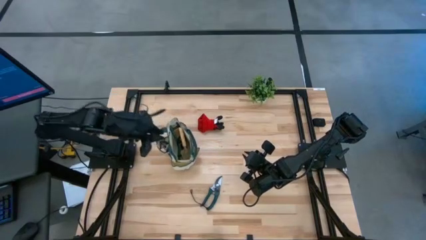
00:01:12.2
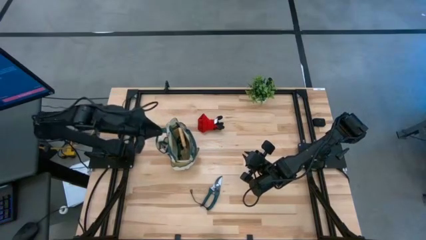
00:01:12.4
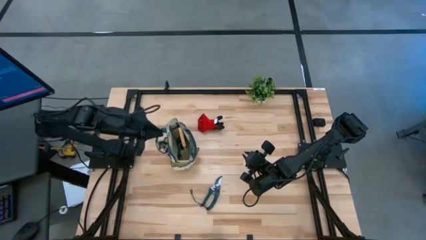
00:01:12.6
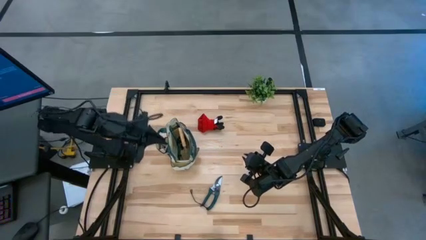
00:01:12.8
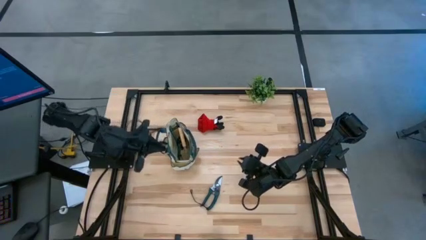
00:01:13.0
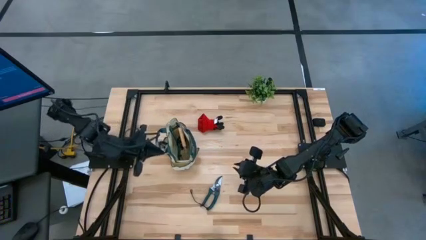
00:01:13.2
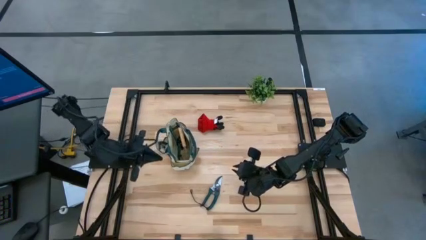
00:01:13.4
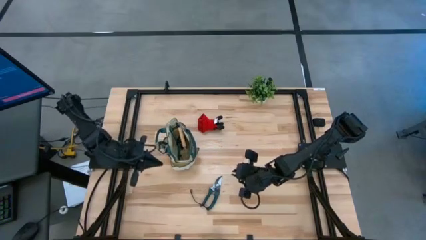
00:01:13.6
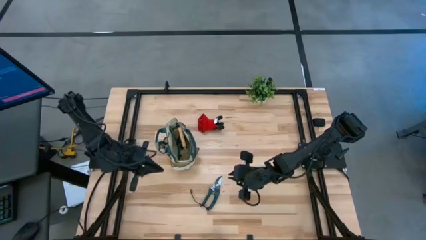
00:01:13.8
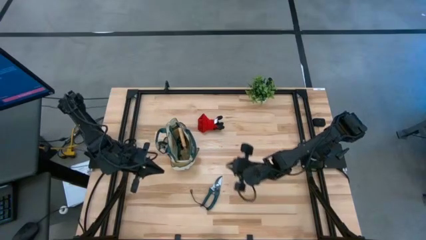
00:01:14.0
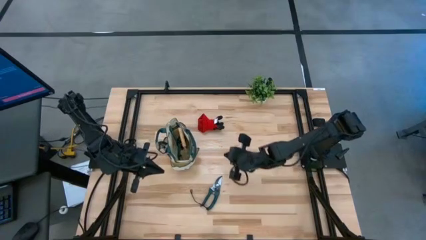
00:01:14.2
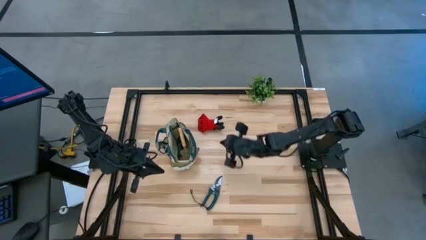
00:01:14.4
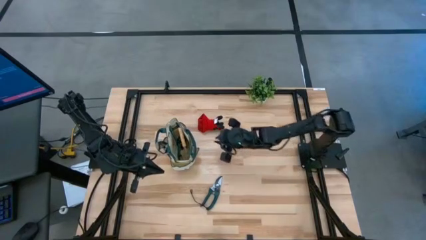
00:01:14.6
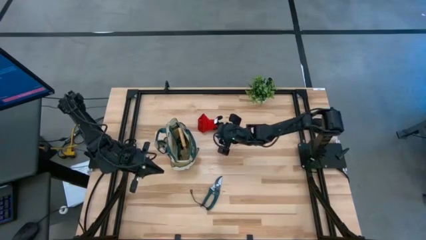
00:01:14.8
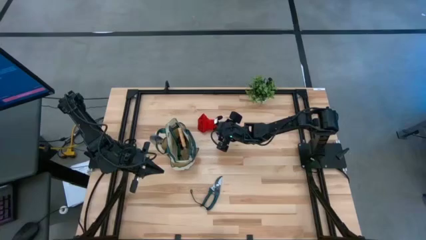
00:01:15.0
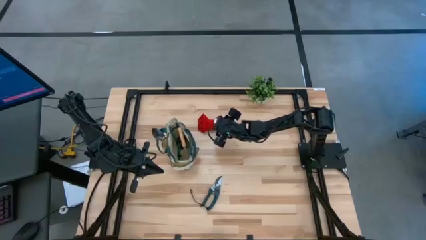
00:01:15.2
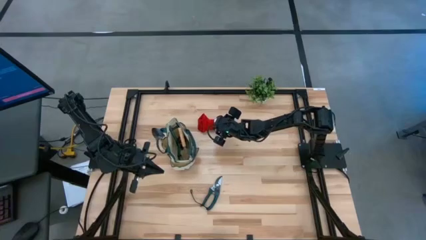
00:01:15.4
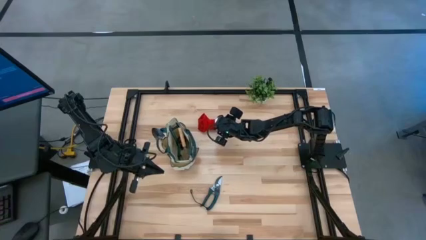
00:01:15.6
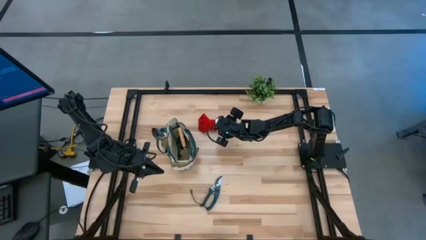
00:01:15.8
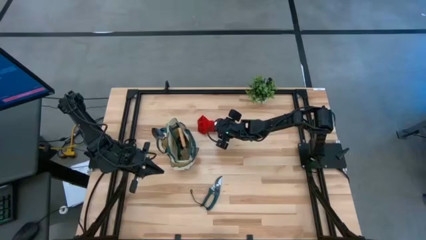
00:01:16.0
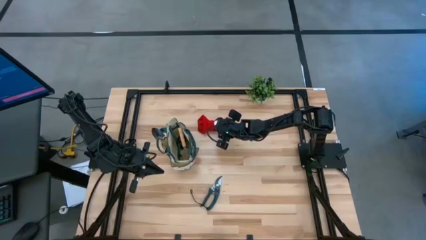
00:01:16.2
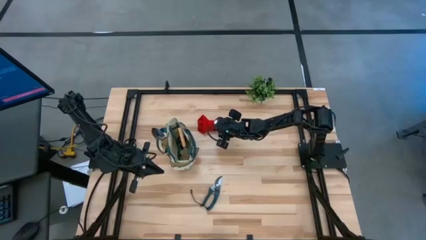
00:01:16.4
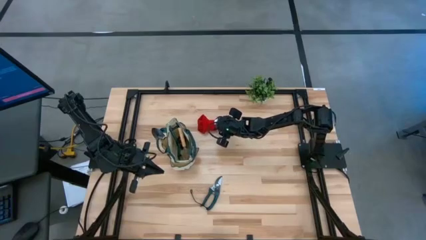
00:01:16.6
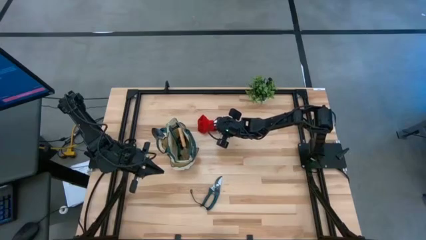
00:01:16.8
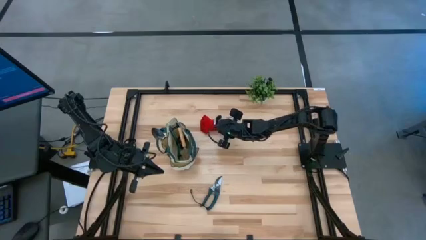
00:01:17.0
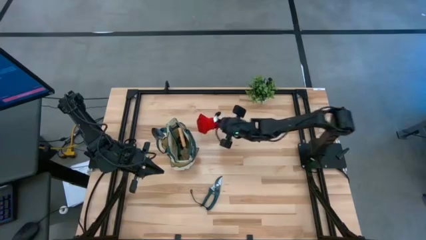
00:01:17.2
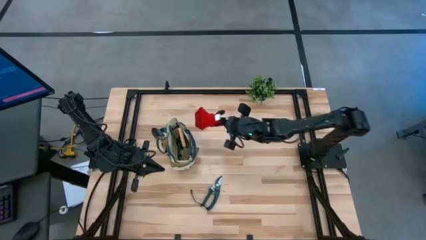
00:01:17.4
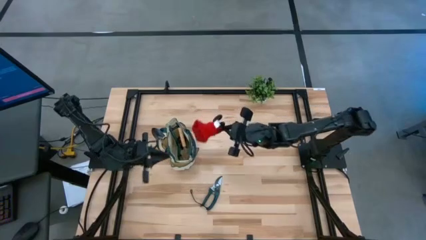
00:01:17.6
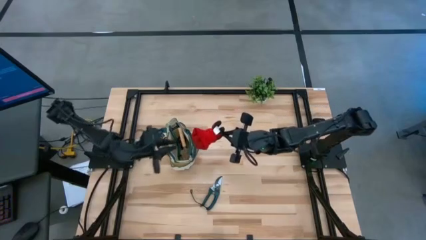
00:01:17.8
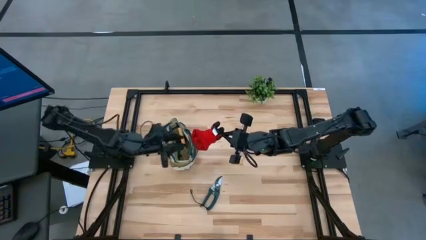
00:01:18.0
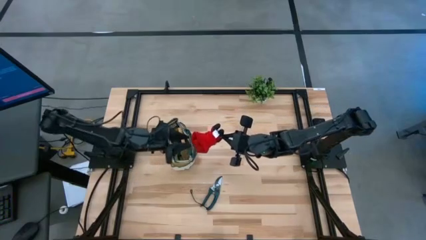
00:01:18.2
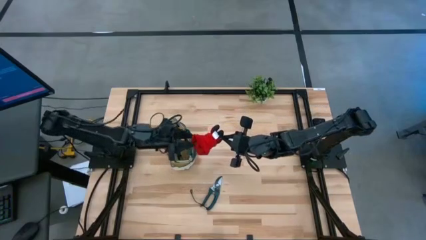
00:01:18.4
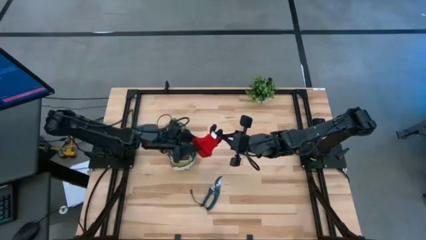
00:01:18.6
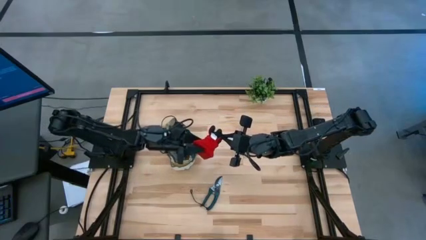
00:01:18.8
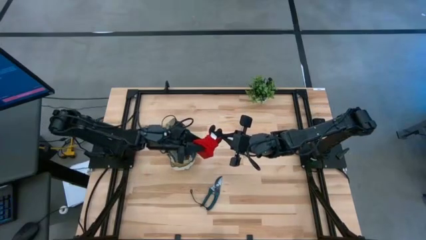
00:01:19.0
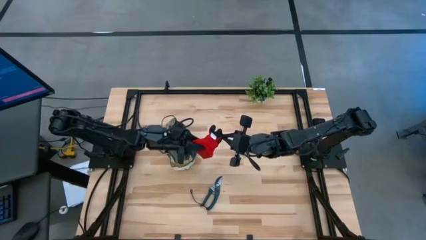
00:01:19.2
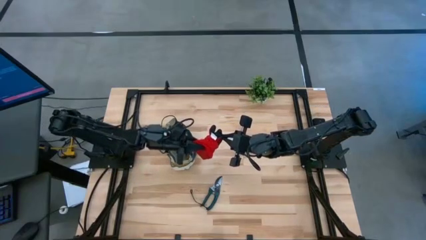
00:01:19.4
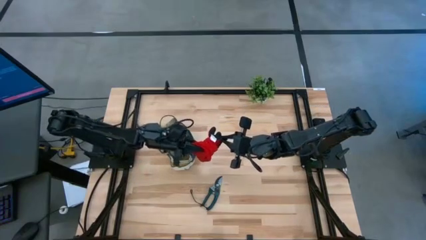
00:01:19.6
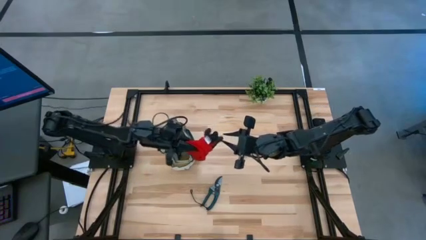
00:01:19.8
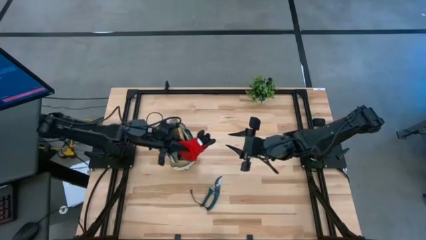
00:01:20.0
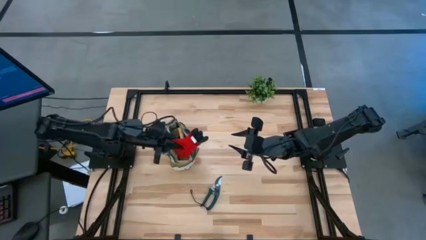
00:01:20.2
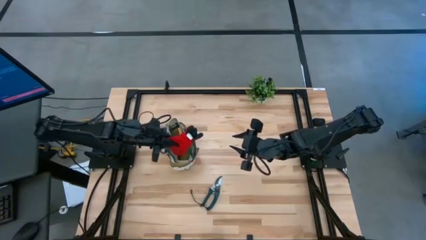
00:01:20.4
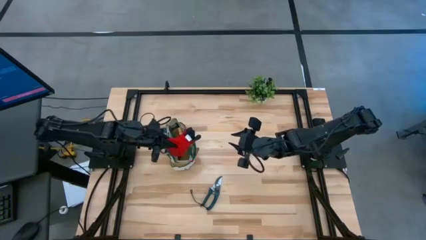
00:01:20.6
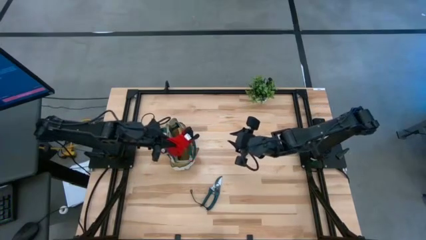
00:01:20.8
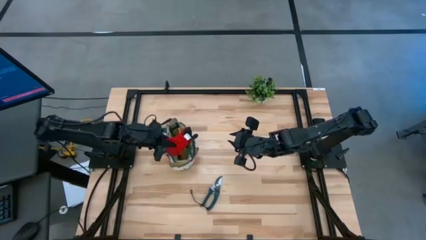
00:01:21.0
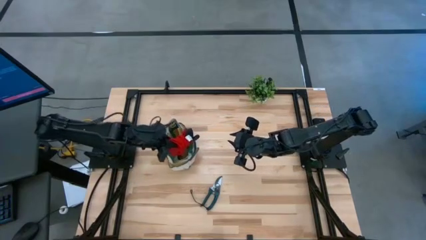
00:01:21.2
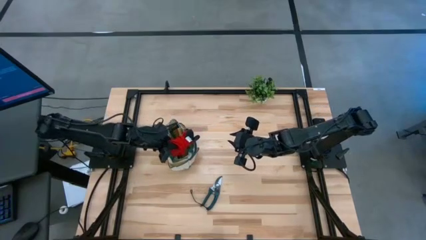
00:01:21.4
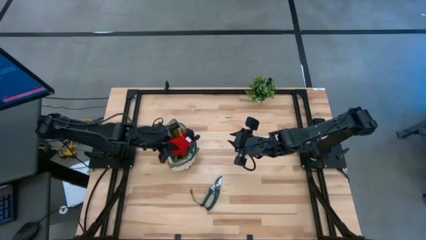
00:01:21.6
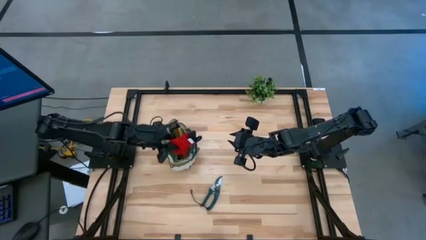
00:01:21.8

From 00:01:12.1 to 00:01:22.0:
Task: Pick & Place Garden tools in Gardening bag
Put the red gloves into the green gardening bag

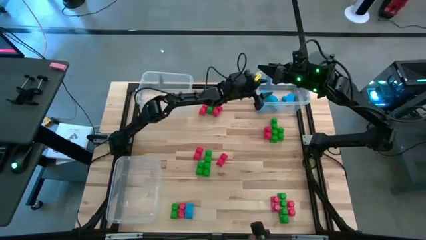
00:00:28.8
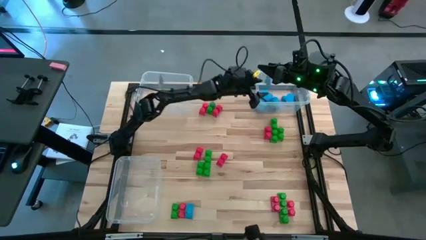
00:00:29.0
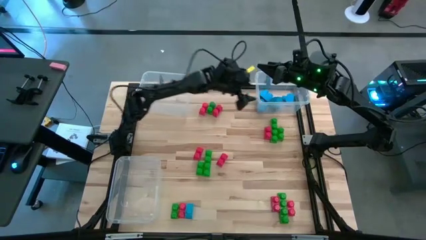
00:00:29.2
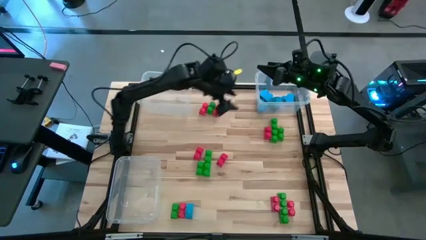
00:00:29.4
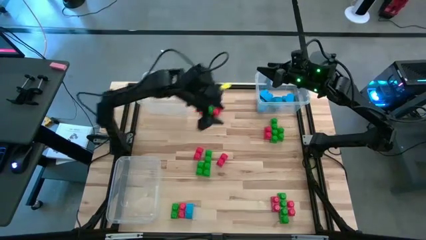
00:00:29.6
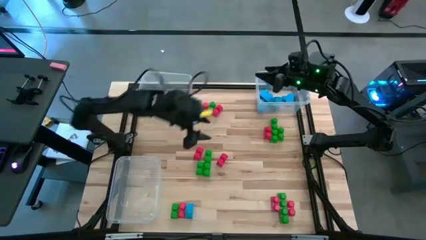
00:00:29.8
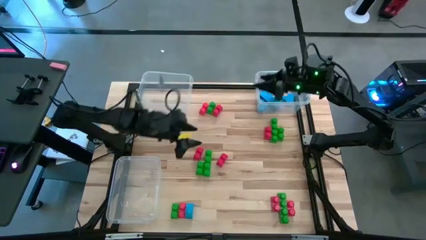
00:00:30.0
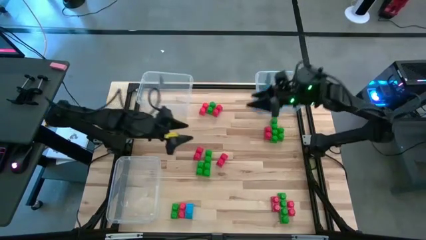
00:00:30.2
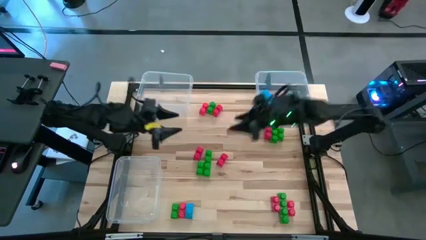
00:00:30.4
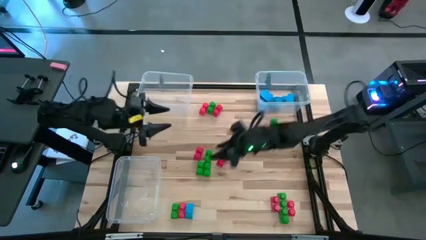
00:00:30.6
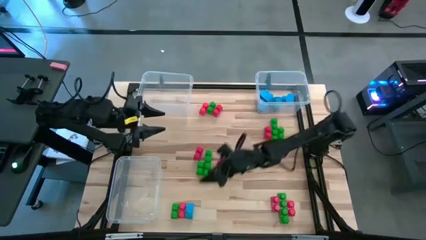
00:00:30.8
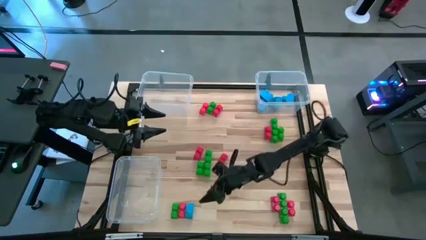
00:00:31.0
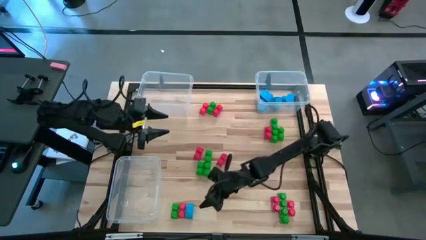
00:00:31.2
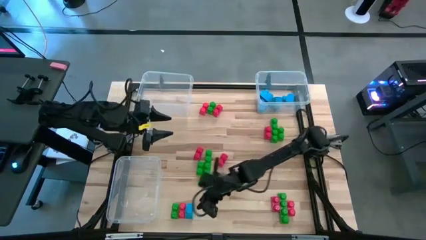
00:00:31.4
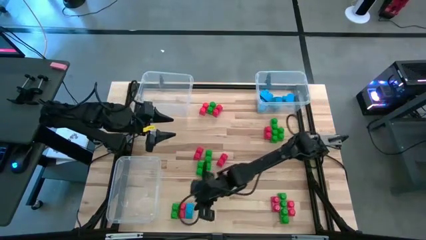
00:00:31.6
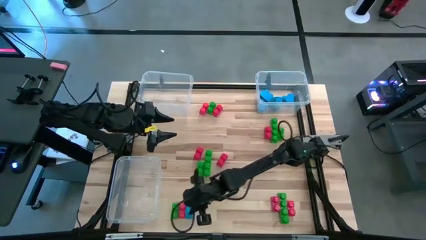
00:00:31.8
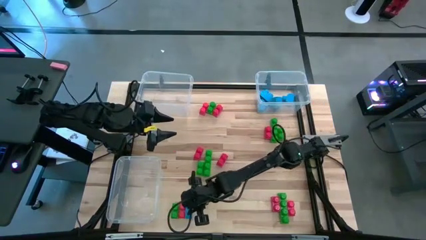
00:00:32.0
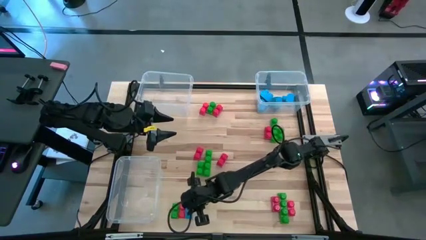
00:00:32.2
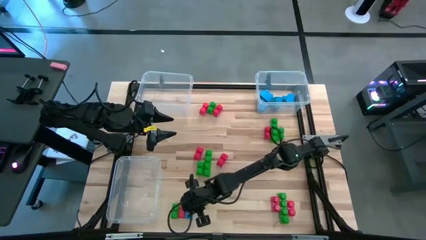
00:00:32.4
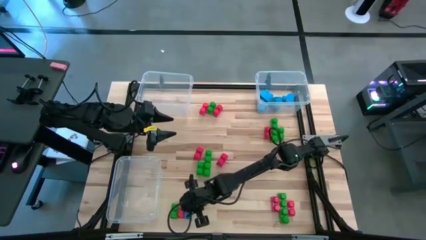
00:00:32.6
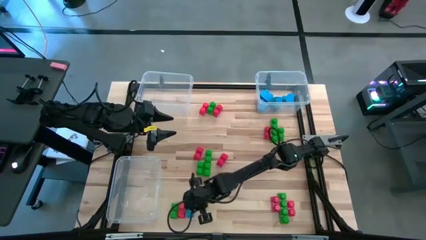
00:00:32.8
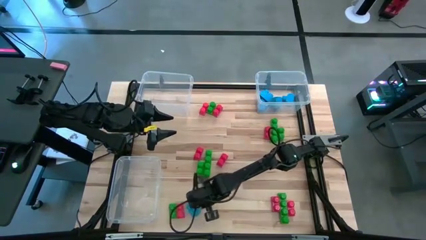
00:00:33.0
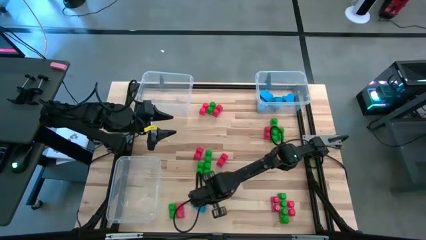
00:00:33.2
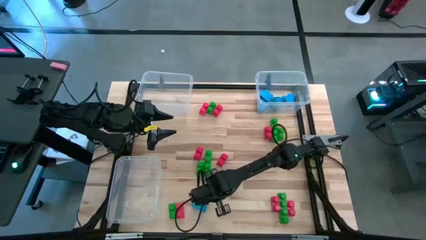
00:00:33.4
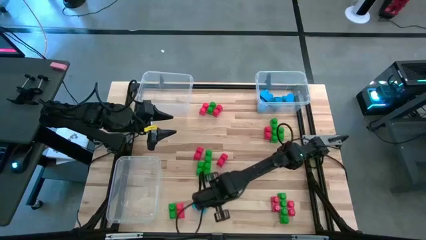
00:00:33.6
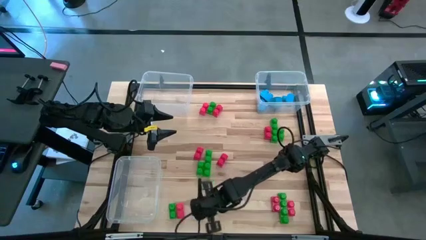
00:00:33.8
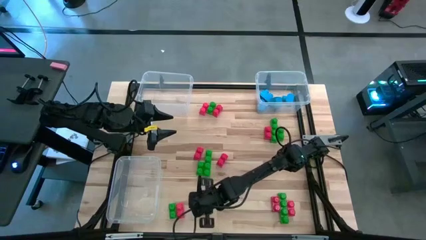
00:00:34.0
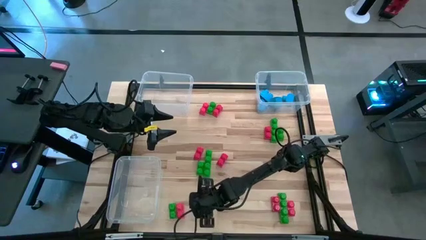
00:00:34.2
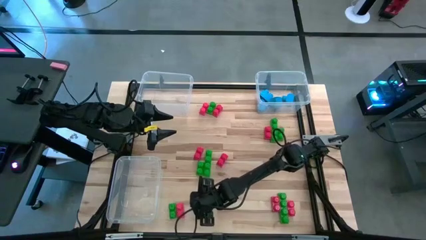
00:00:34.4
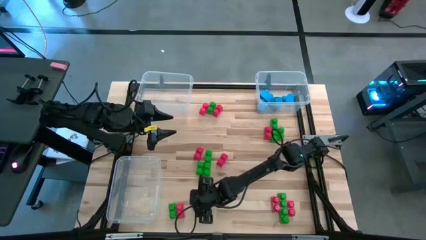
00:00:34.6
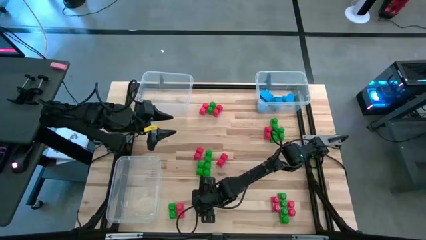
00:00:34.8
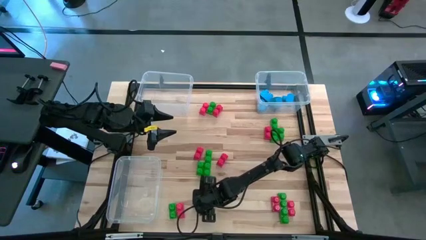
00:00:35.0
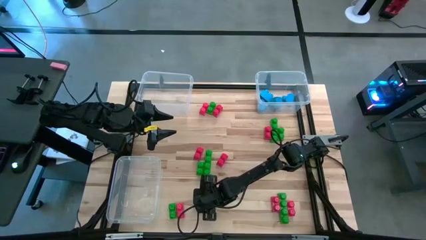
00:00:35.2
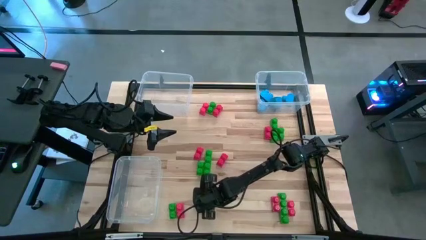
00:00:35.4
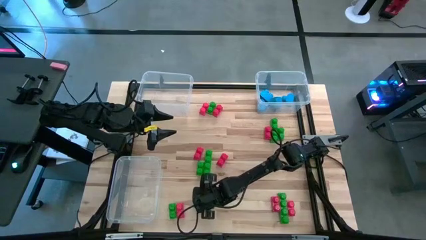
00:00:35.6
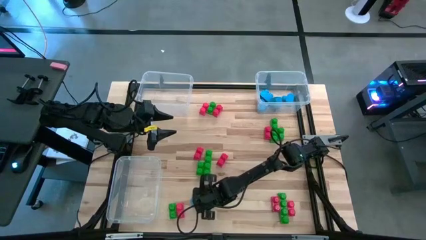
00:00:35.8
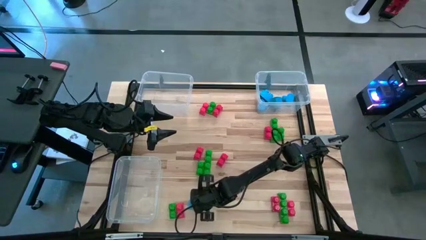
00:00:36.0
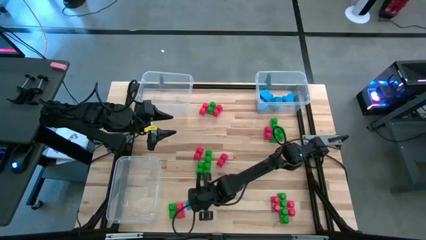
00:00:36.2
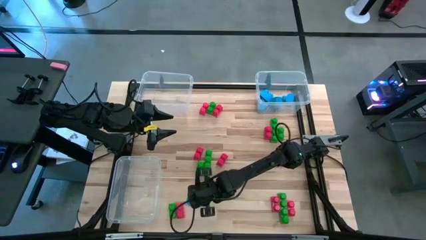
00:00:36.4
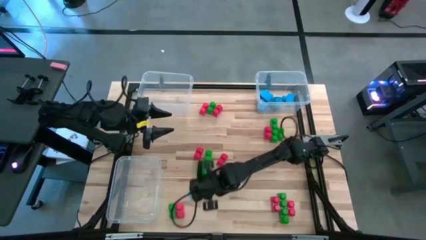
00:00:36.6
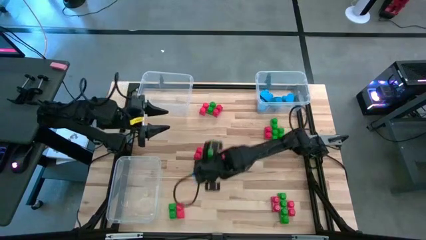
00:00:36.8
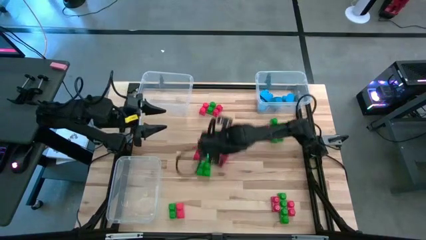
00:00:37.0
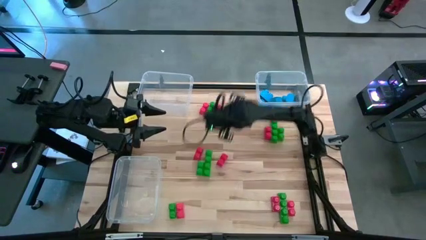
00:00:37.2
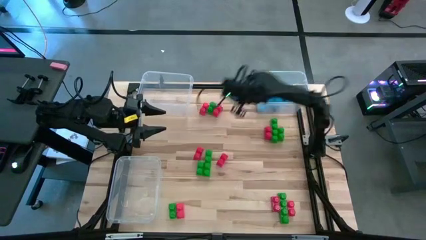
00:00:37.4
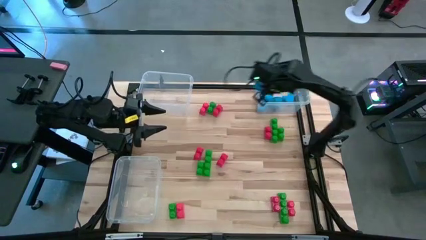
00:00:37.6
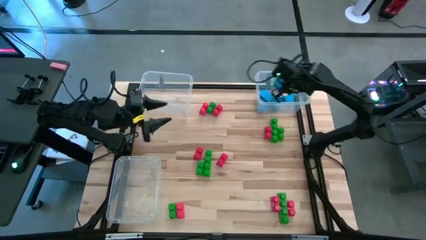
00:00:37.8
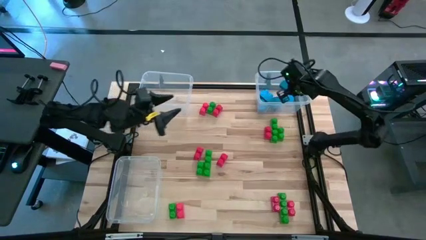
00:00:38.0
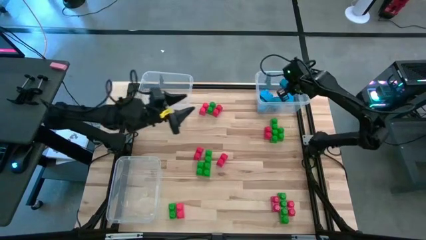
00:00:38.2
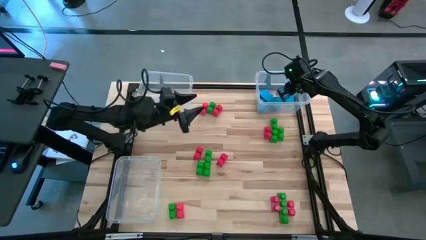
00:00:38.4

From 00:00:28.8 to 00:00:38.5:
Task: Sort blocks
Put the blue game piece into the top right transparent bin
